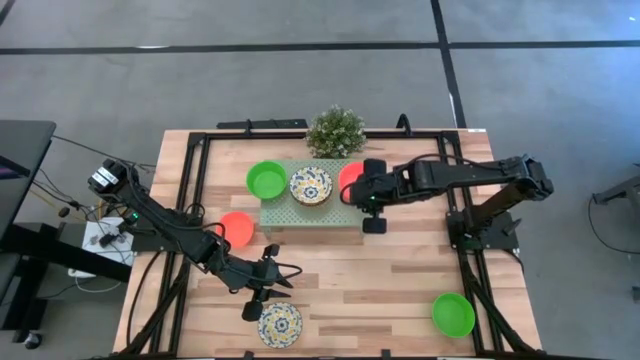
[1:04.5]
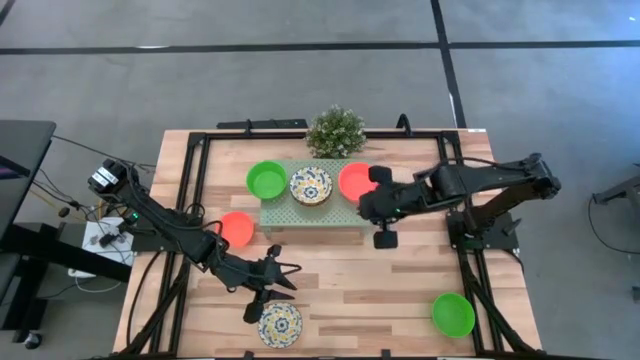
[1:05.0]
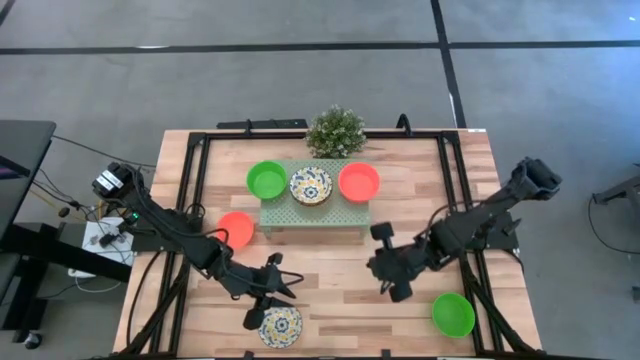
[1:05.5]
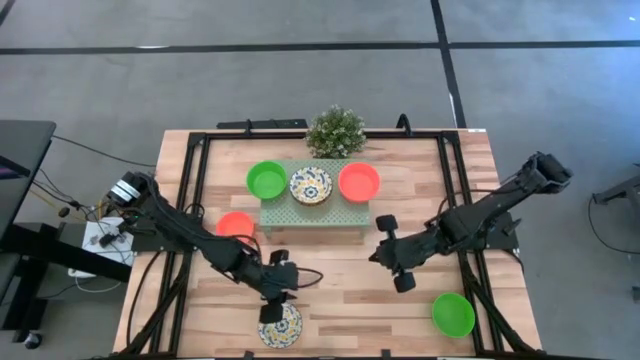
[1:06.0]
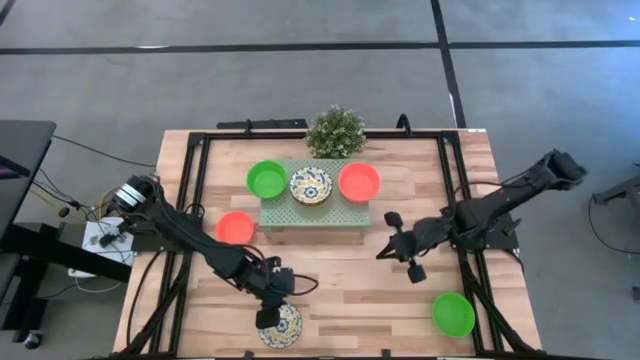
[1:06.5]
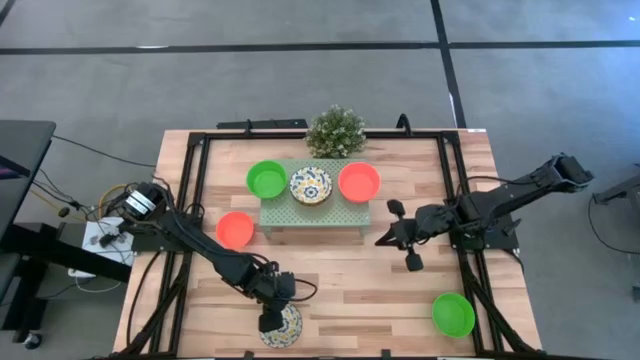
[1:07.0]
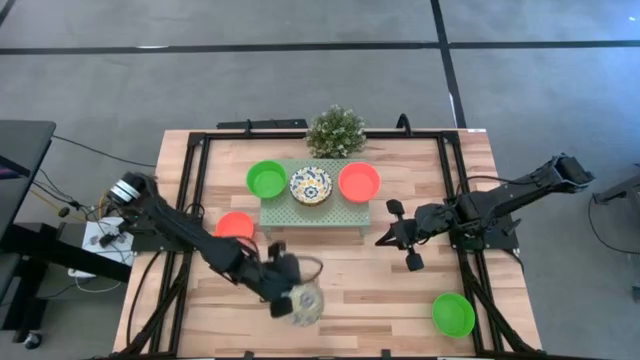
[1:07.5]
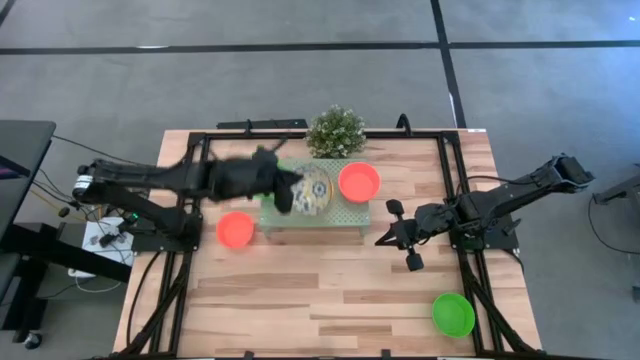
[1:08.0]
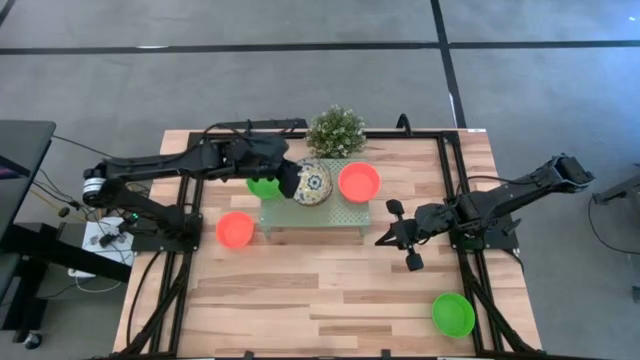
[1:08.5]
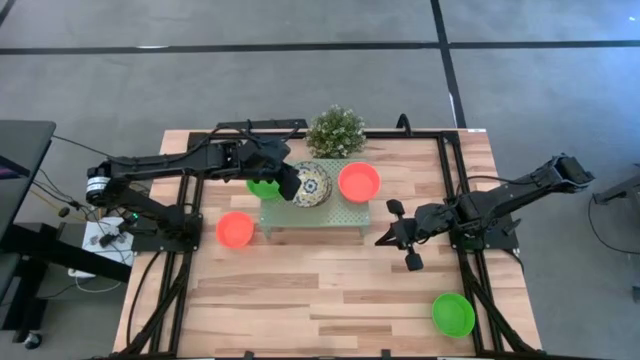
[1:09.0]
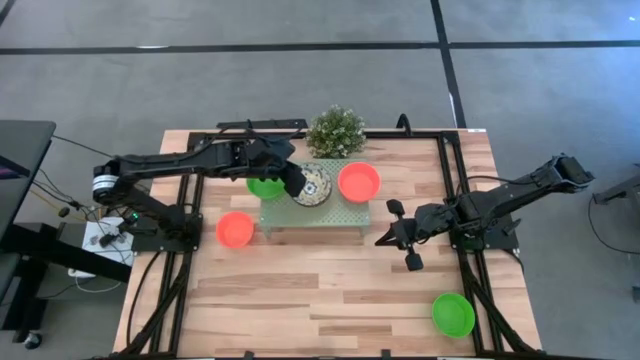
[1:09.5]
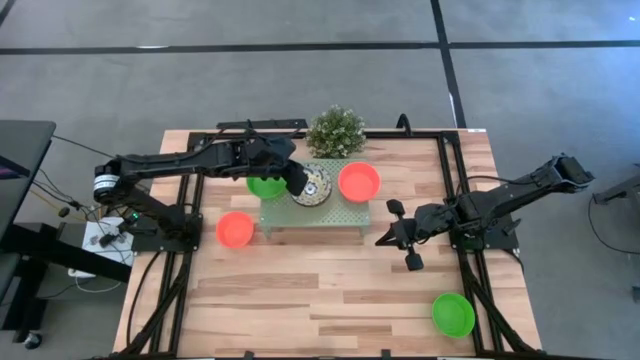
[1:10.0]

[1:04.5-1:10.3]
Task: Pick & Place Mini bowls
Stack the yellow patterned bowl on the yellow patterned bowls on the shelf

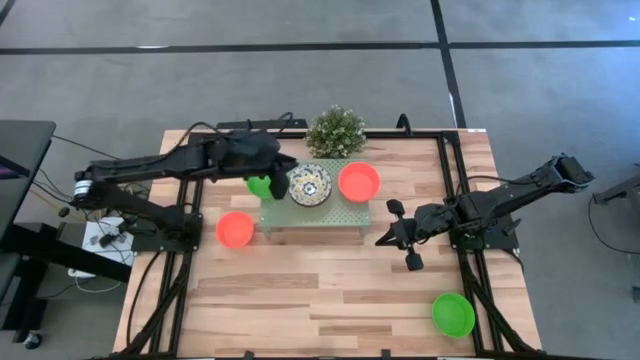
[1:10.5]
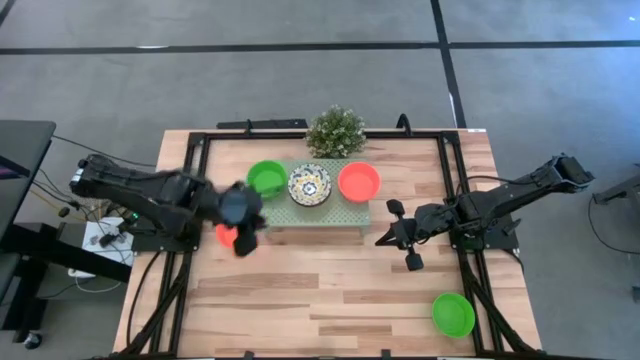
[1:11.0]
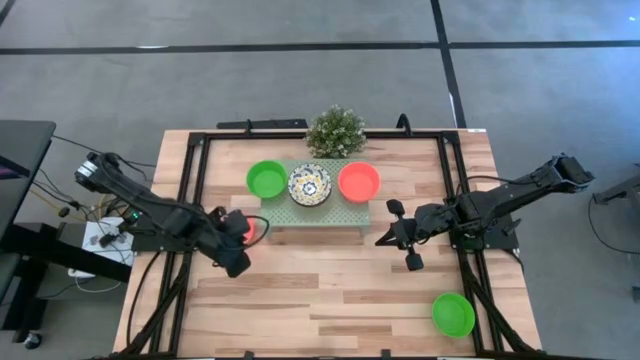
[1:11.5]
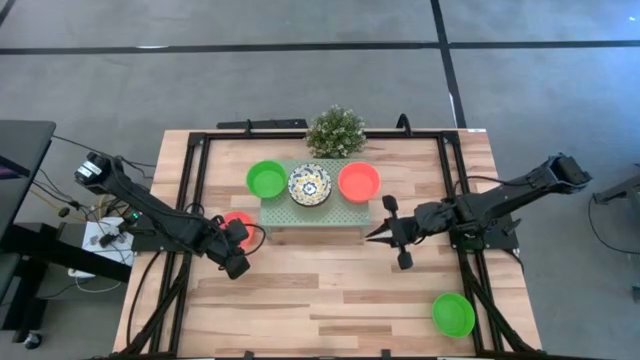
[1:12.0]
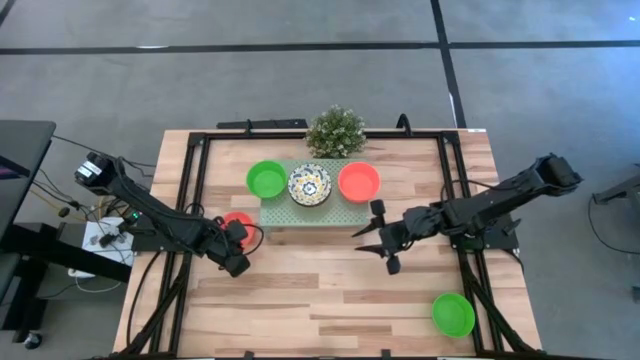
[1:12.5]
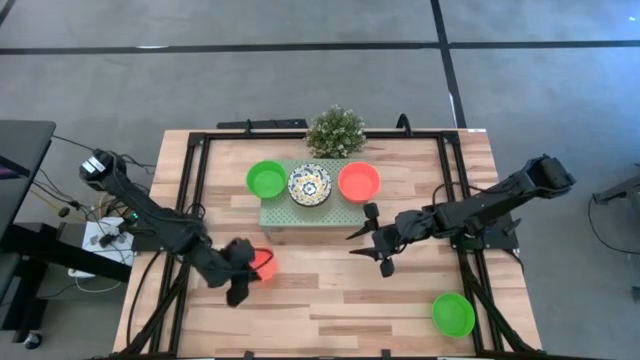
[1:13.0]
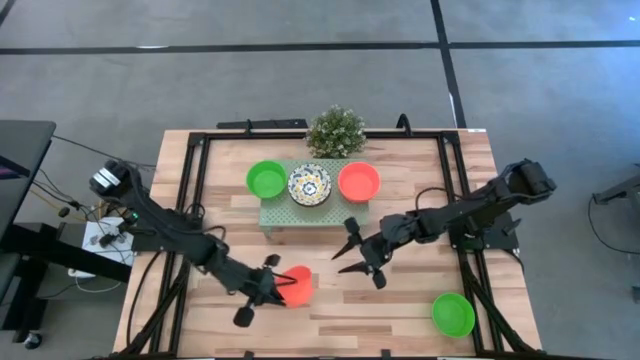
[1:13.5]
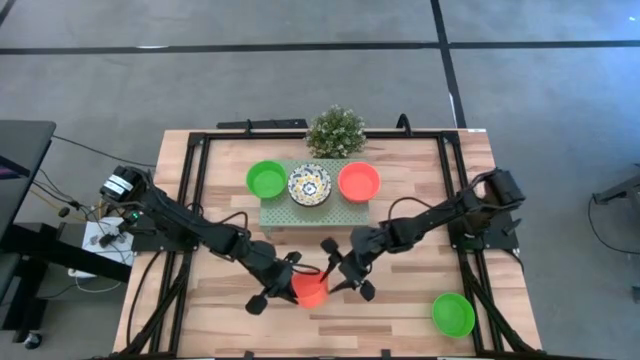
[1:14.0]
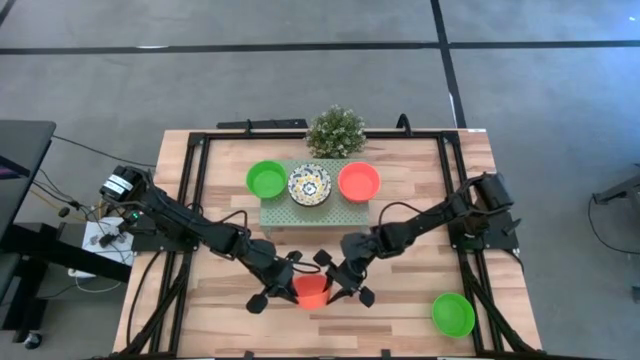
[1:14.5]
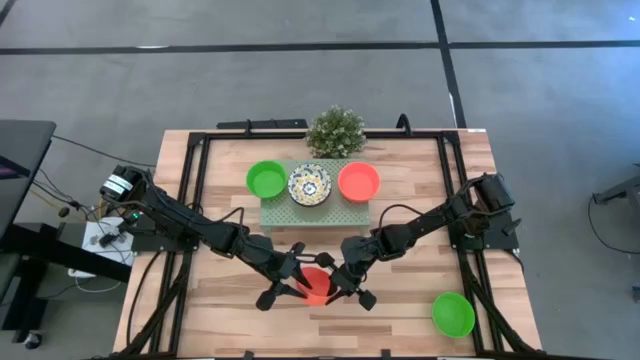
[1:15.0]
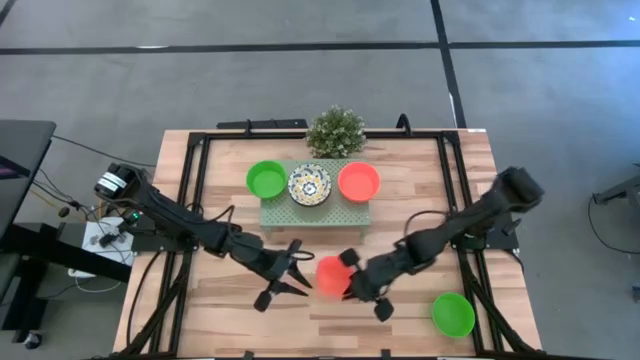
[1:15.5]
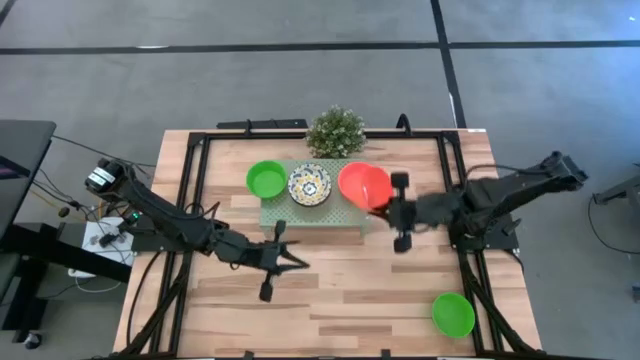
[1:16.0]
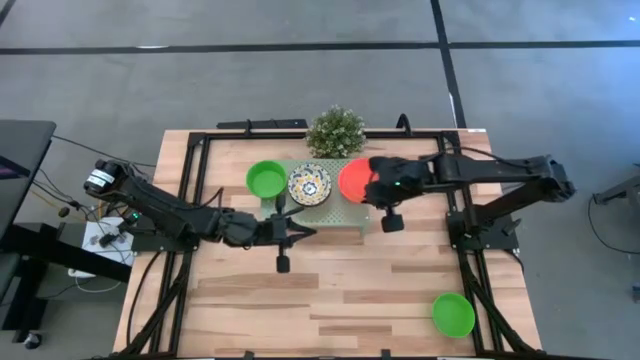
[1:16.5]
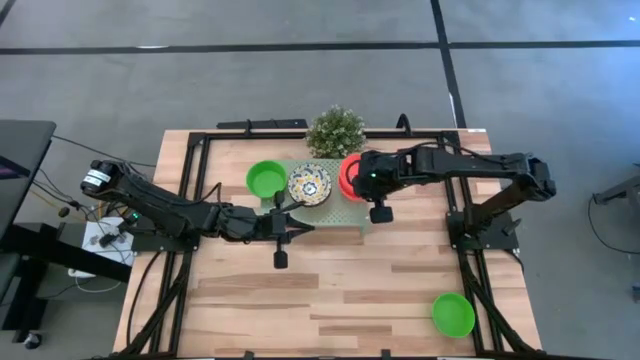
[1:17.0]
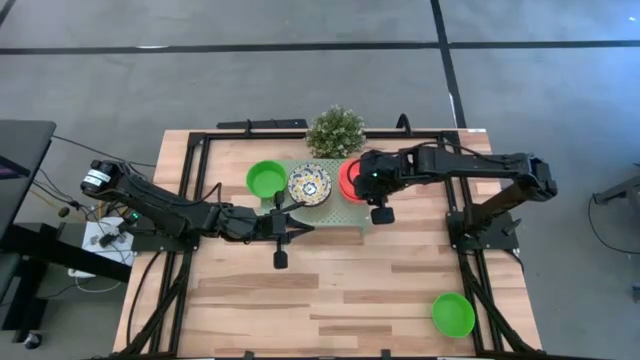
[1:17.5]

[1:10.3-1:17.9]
Stack the orange bowl on the orange bowls on the shelf

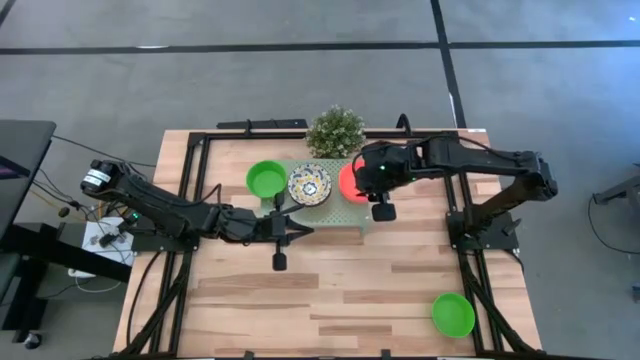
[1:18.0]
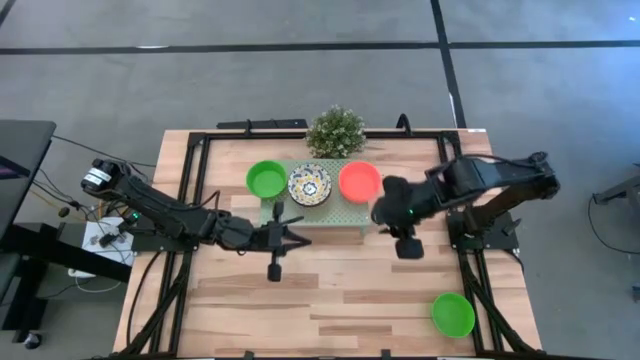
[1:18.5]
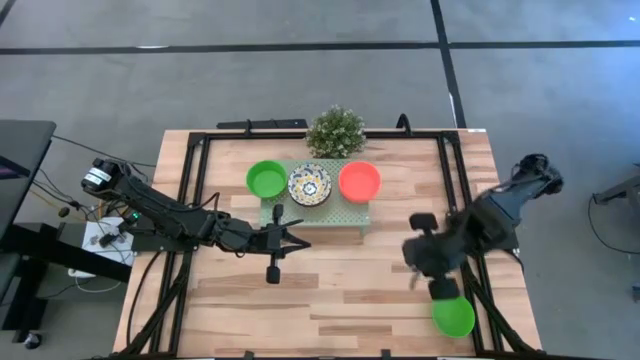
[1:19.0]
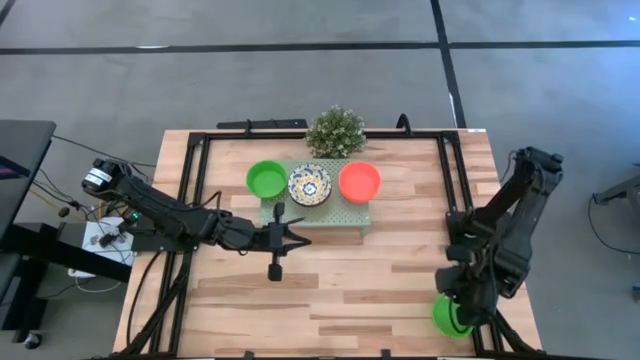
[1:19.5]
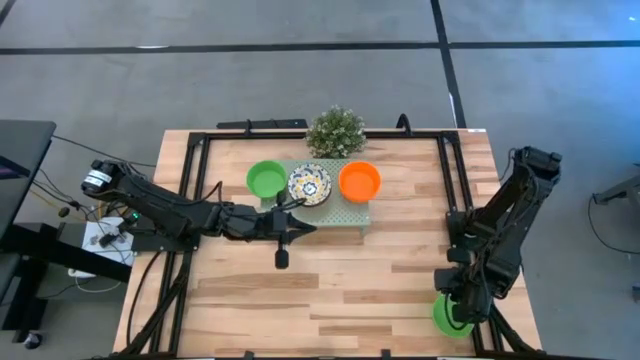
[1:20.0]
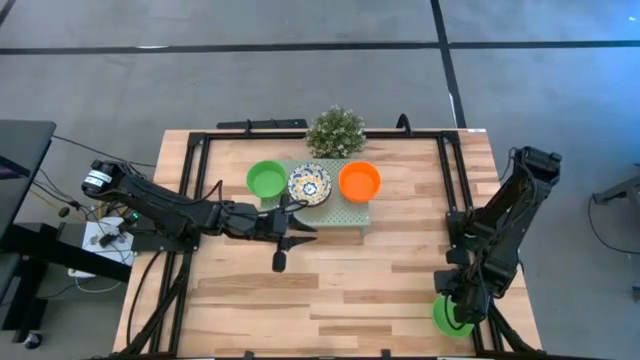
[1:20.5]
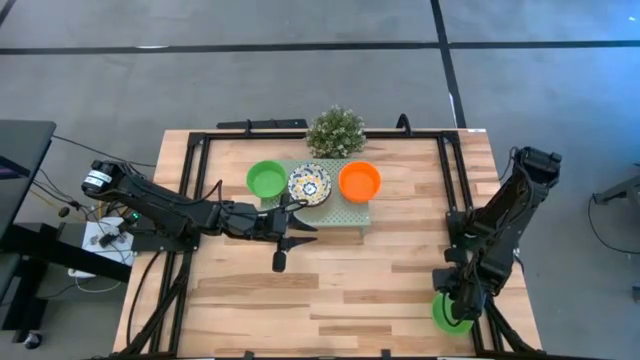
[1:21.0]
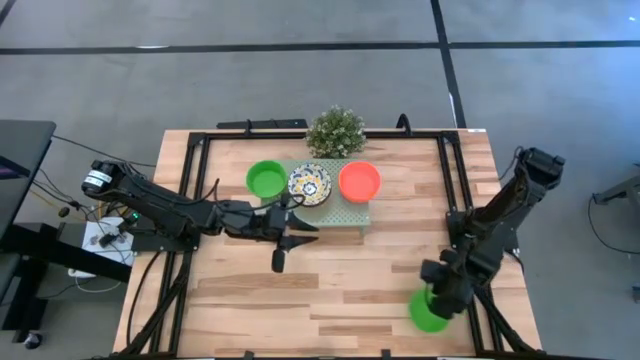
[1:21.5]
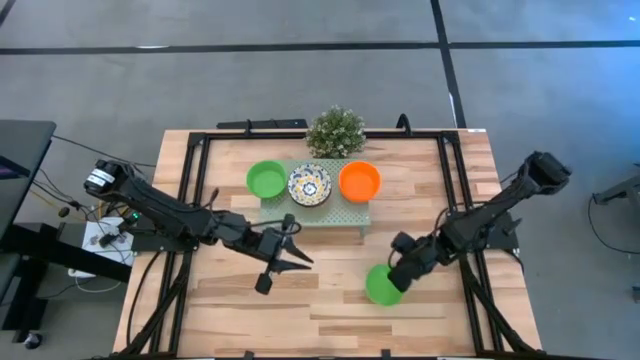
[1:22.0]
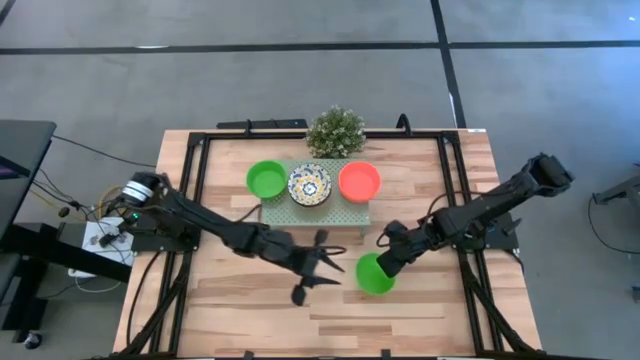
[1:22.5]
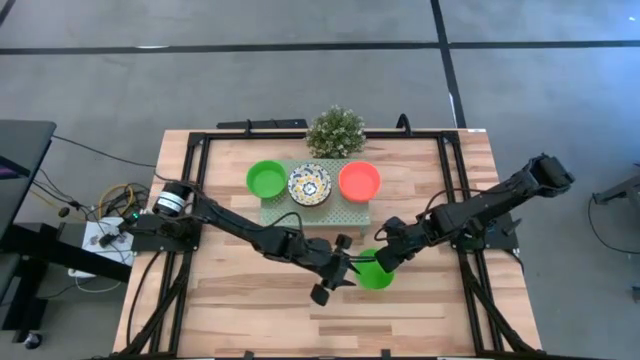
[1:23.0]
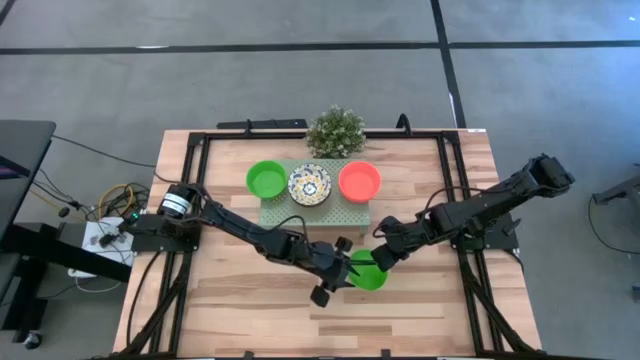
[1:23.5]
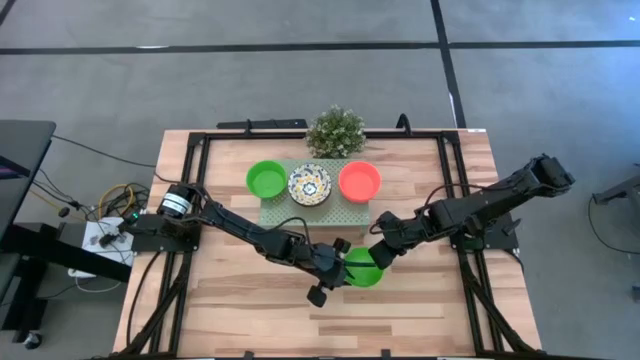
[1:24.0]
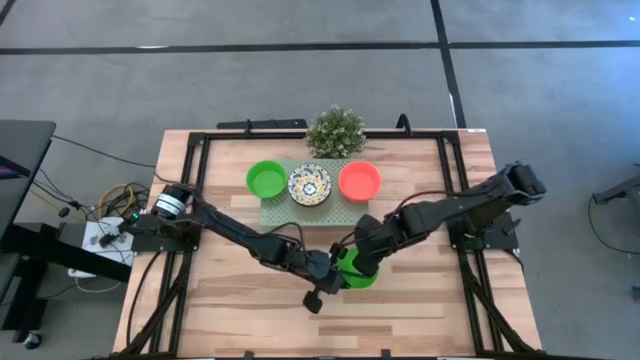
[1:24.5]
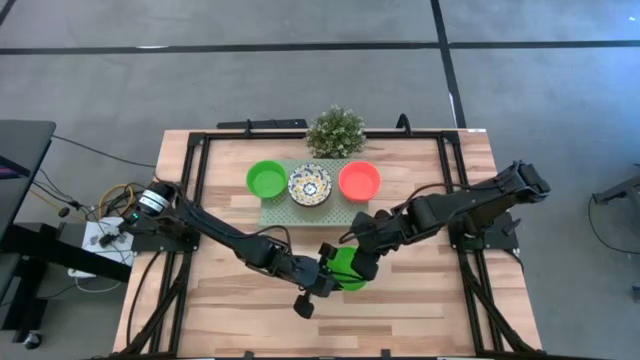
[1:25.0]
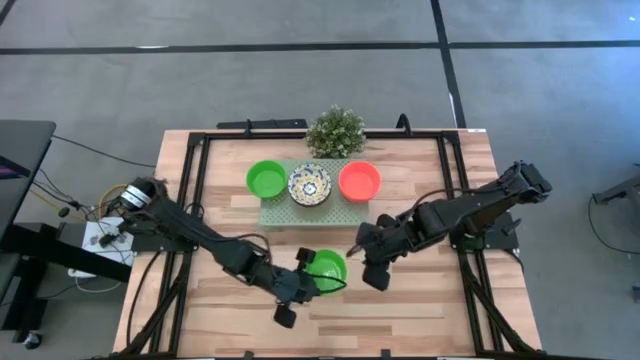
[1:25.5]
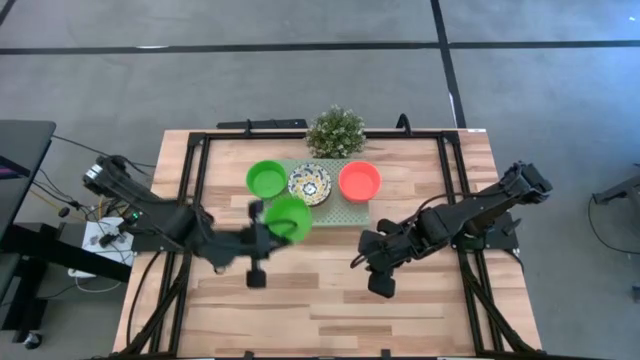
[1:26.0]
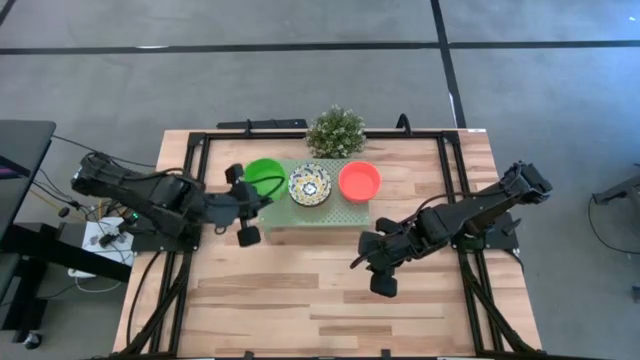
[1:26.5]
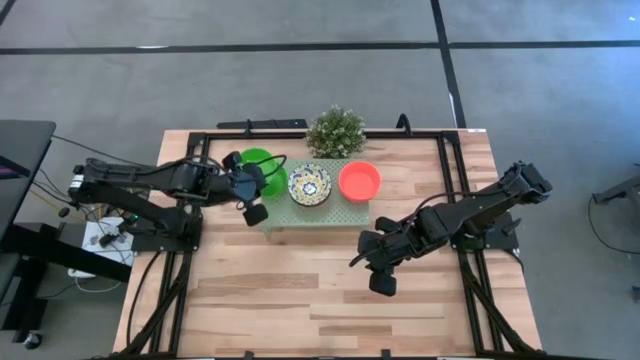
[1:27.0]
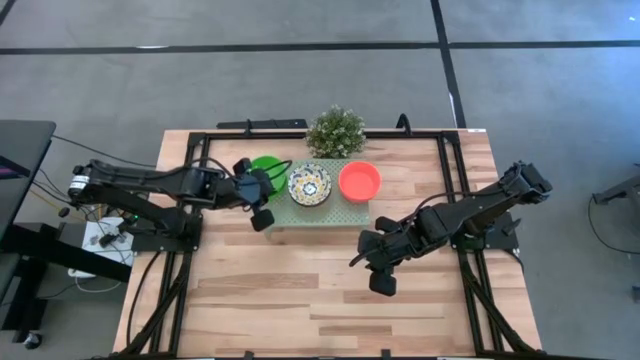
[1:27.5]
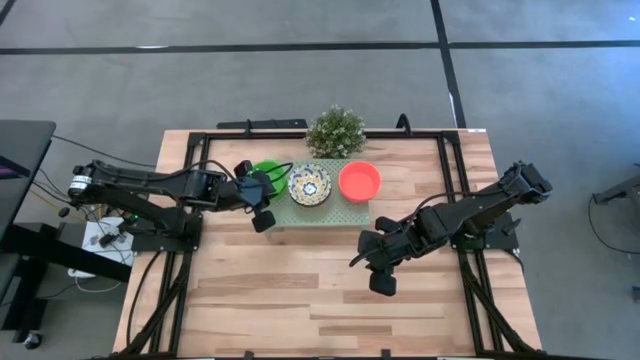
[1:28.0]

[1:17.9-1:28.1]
Stack the green bowl on the green bowls on the shelf
